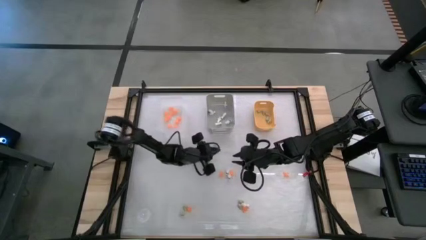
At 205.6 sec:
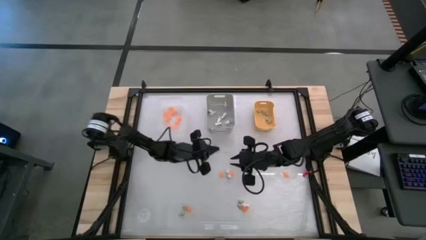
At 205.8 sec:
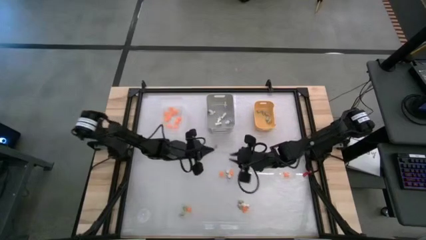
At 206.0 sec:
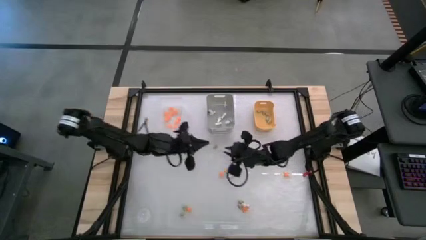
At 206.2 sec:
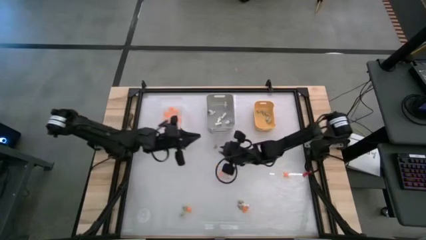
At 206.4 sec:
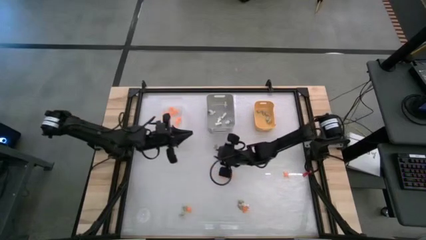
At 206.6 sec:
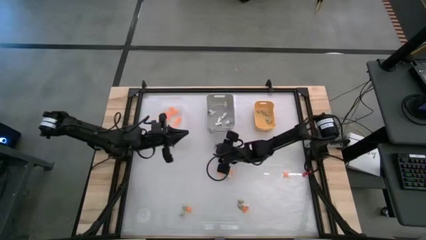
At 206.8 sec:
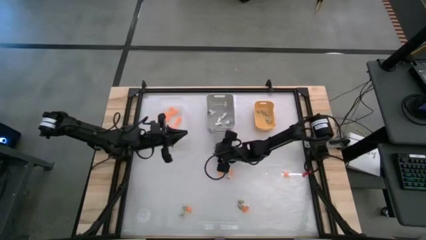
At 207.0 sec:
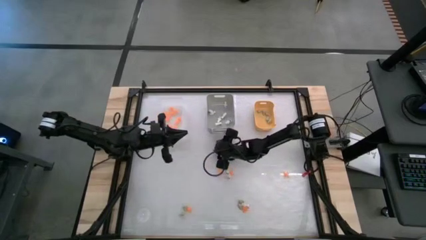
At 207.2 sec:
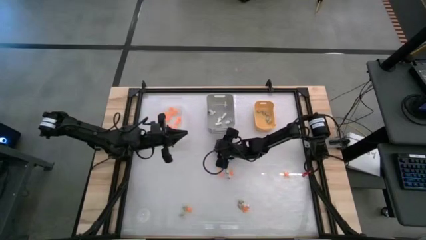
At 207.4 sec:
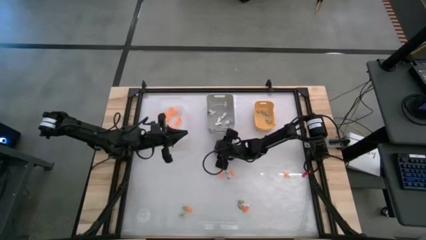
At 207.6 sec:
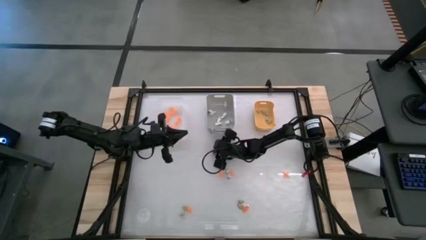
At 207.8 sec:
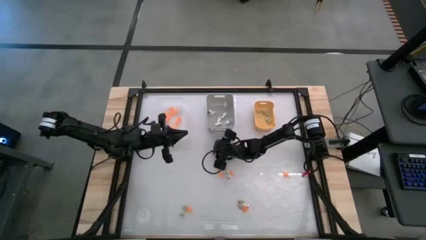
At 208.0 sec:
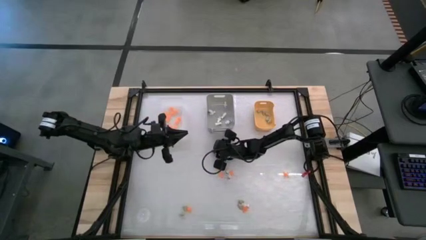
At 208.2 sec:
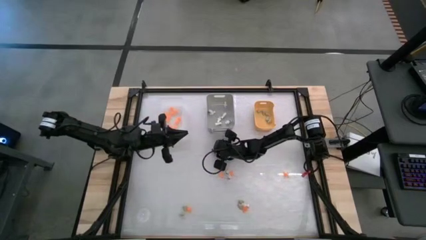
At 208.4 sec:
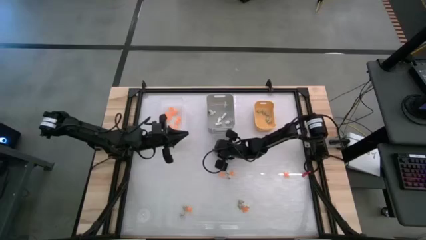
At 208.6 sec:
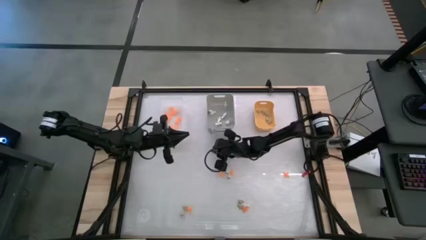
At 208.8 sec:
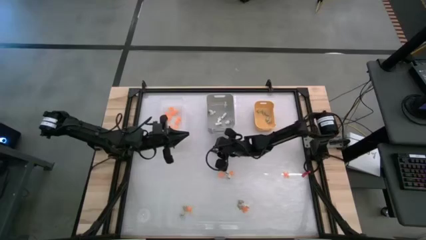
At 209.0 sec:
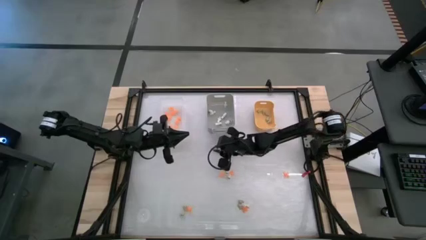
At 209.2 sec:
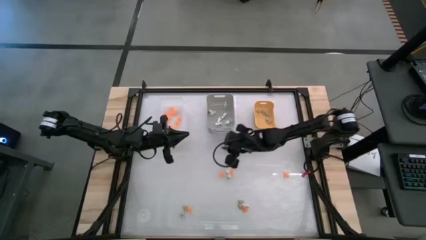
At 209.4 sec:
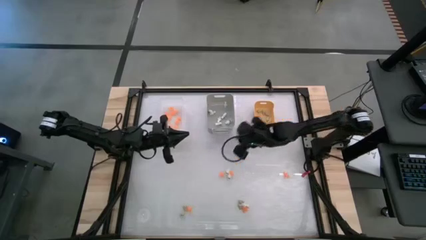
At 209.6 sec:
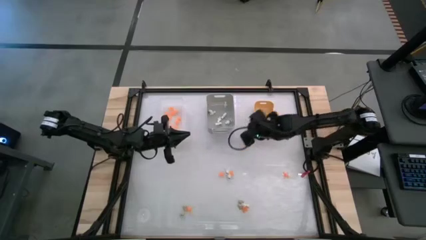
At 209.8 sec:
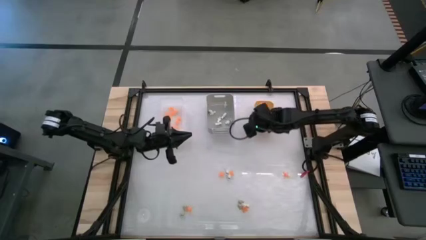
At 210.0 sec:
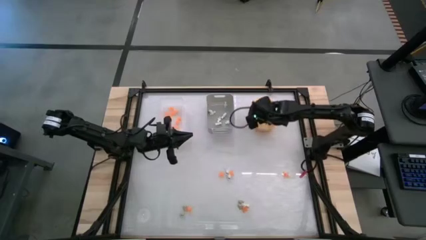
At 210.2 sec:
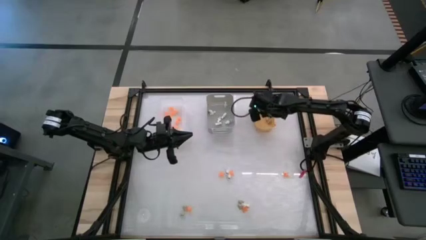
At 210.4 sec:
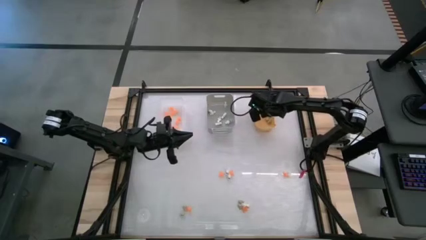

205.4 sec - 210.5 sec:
Task: Sort Halloween decoration
Put the cream white skull toy into the yellow bin

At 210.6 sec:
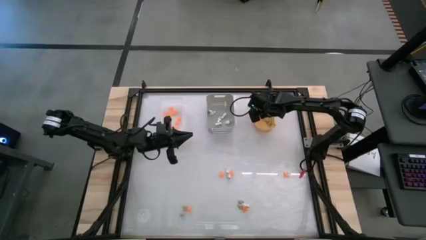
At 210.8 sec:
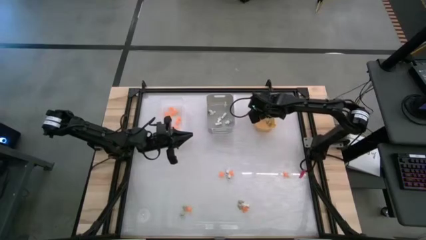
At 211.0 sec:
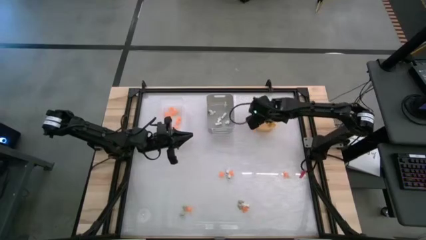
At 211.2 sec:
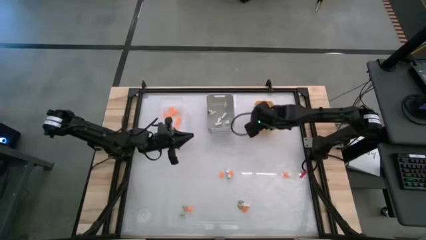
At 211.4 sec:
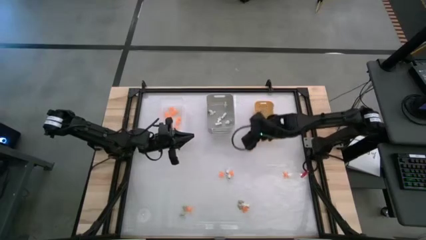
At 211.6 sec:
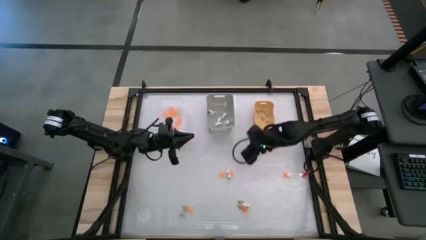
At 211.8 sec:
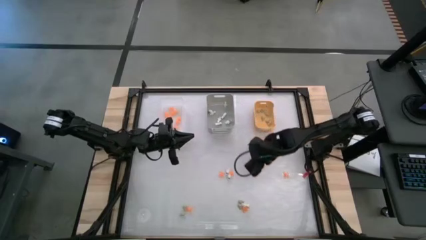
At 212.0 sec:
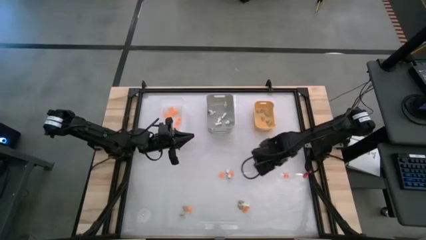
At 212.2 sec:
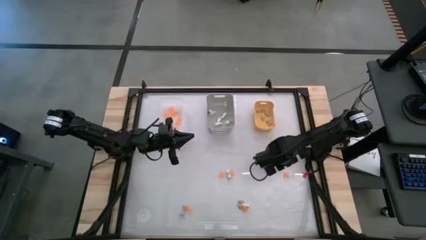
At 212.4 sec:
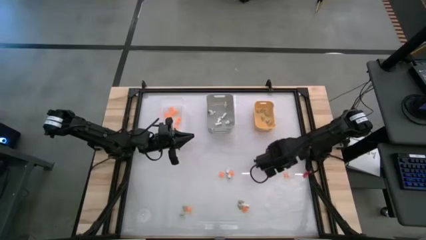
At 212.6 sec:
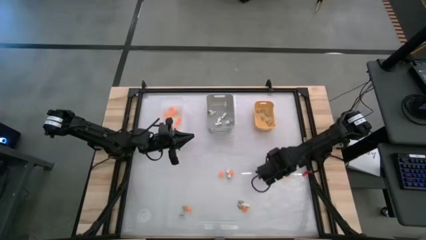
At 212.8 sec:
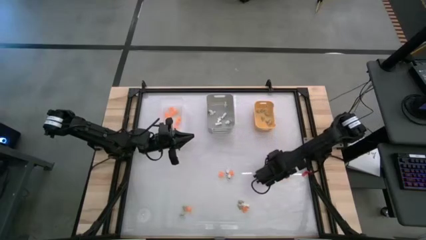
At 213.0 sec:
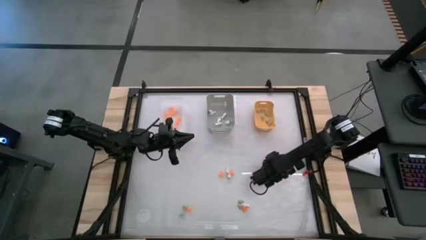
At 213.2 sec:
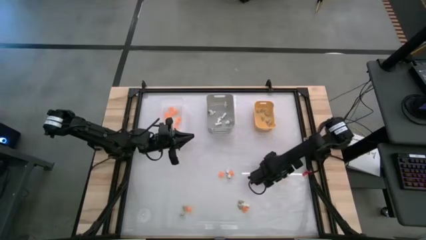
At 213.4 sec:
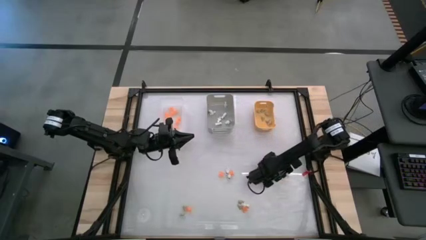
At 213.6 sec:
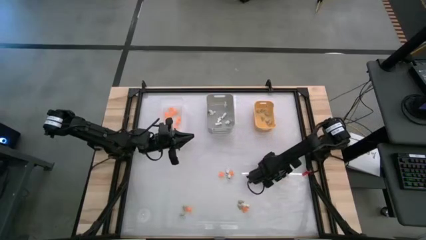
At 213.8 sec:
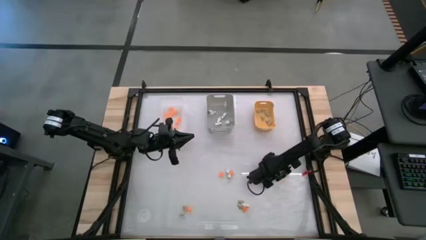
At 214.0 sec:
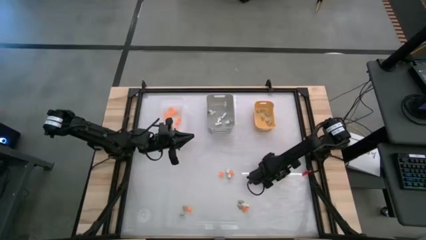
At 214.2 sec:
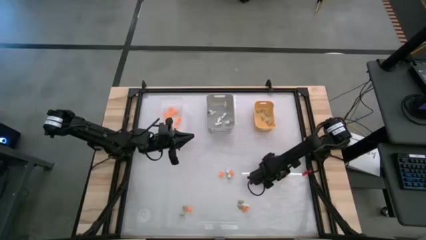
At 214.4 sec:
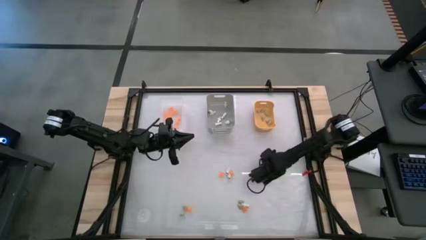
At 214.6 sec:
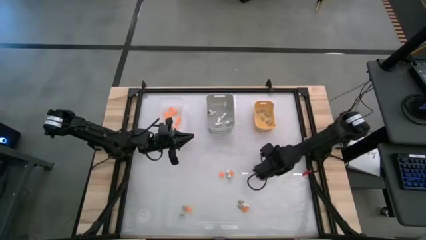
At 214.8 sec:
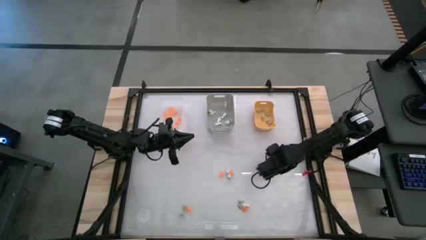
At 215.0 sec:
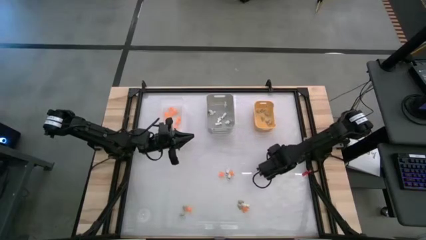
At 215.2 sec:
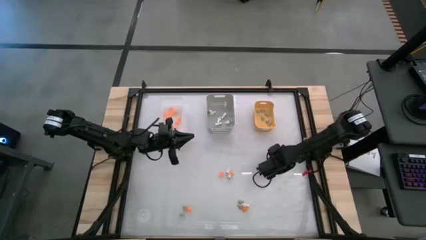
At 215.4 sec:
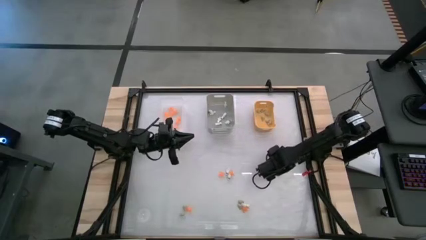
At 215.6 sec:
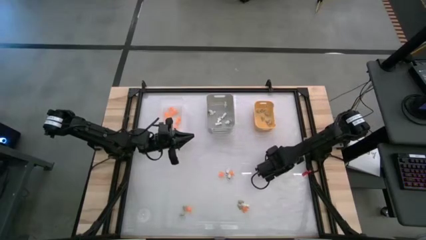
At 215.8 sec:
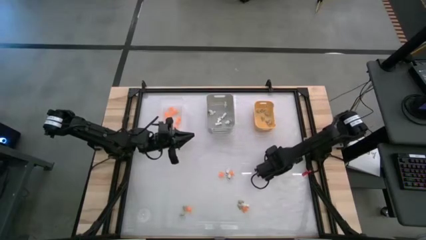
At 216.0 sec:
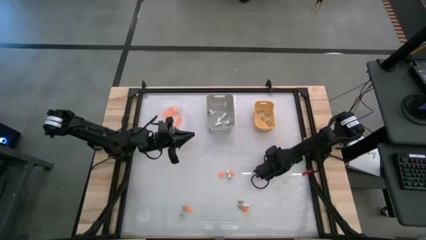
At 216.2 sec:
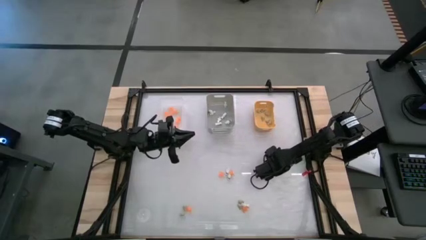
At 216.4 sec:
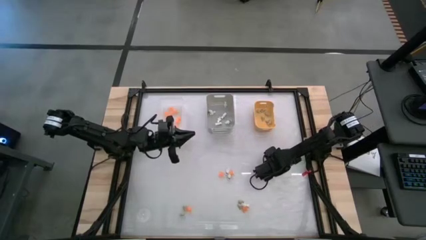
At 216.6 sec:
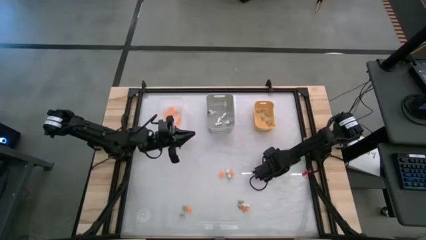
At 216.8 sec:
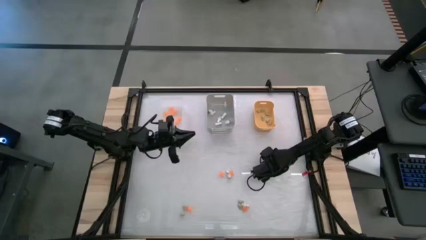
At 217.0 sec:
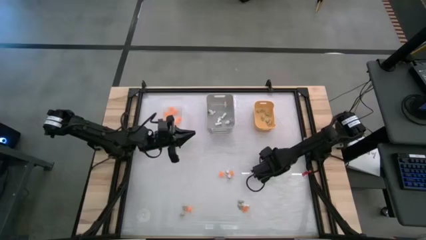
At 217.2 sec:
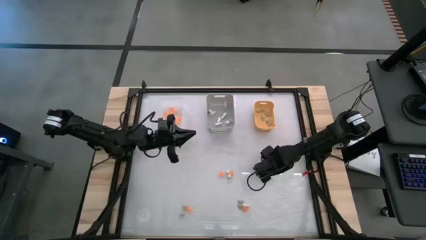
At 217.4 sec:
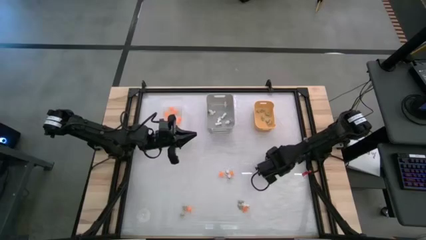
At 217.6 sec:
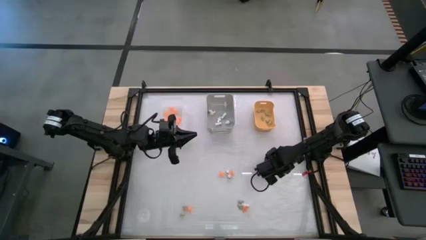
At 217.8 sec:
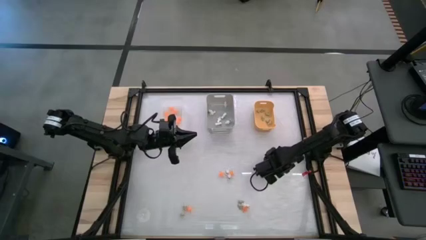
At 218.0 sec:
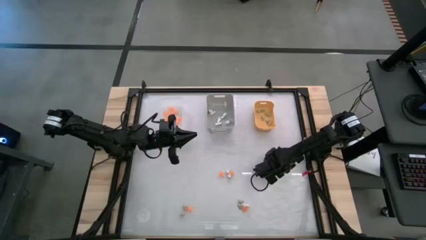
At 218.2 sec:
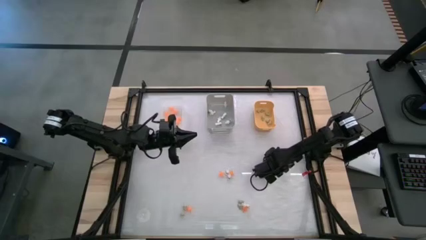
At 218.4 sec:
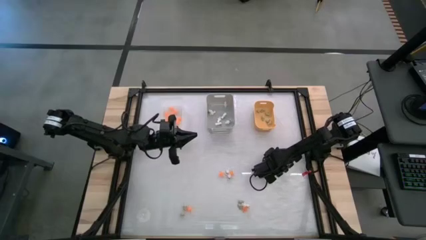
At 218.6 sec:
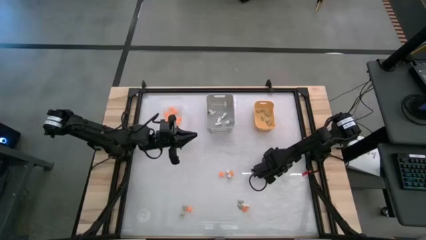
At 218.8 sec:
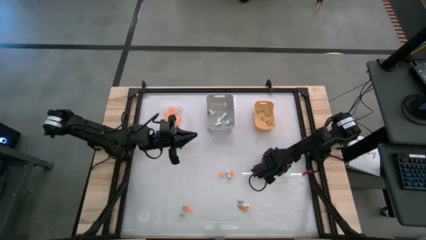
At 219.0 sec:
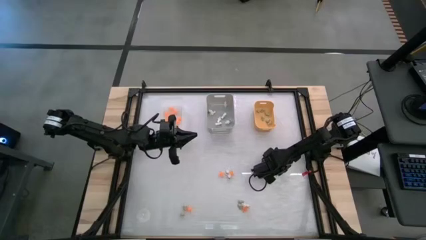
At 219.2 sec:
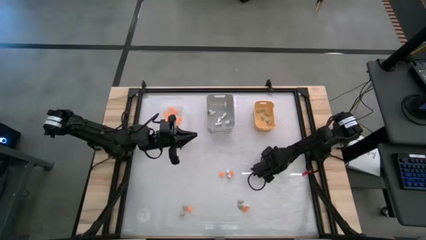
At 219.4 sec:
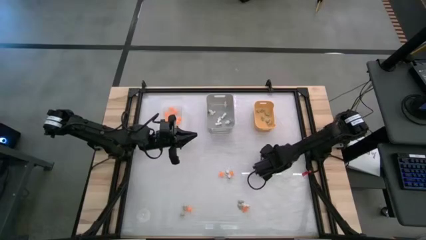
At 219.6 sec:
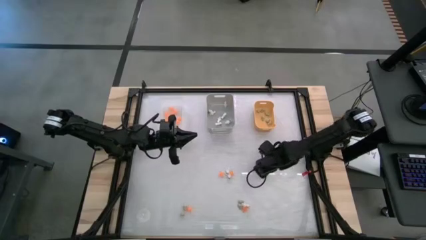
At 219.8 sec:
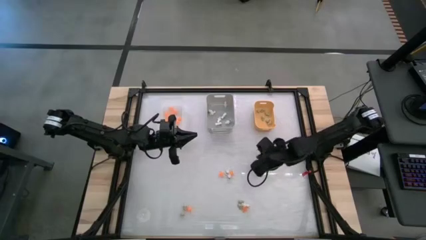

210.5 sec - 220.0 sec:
Put the orange spider toy into the transparent white bin

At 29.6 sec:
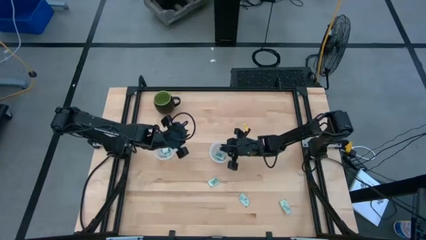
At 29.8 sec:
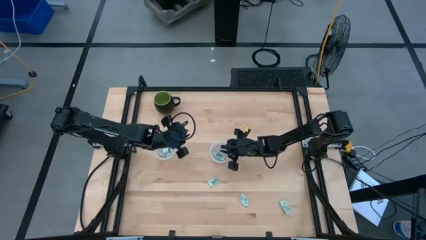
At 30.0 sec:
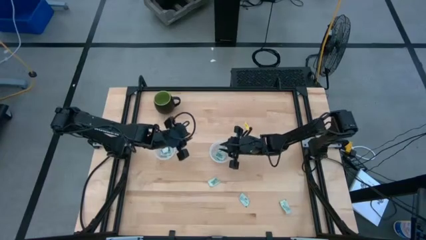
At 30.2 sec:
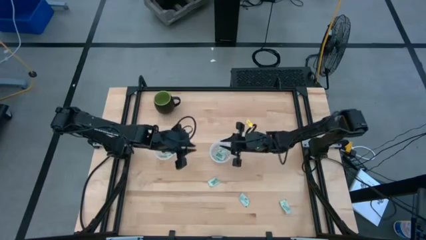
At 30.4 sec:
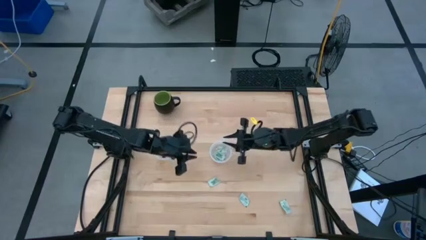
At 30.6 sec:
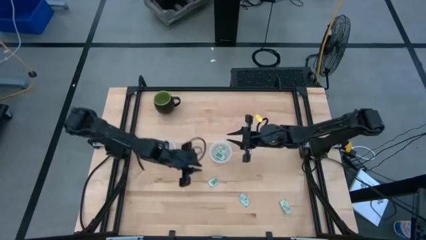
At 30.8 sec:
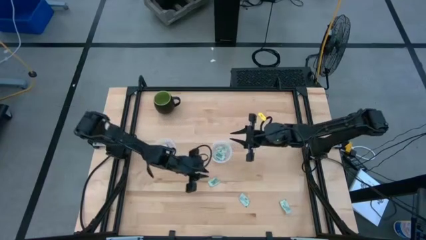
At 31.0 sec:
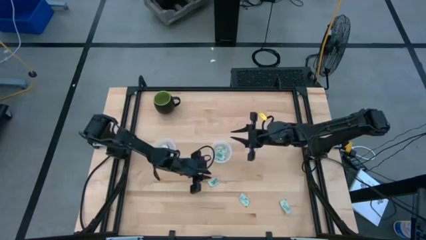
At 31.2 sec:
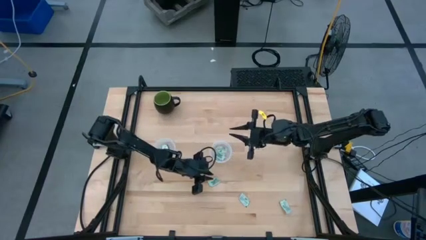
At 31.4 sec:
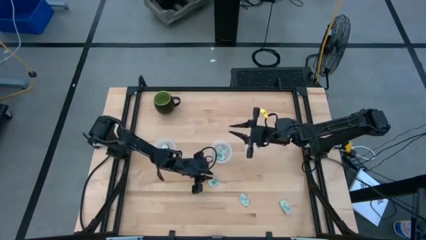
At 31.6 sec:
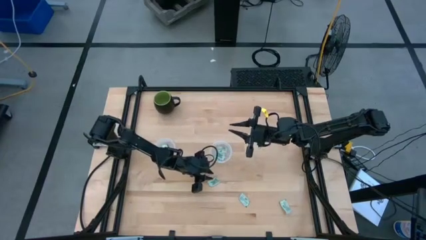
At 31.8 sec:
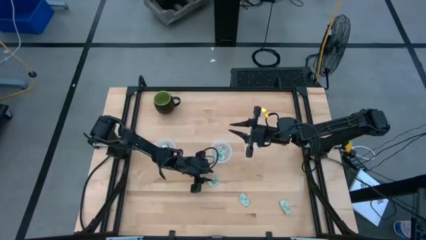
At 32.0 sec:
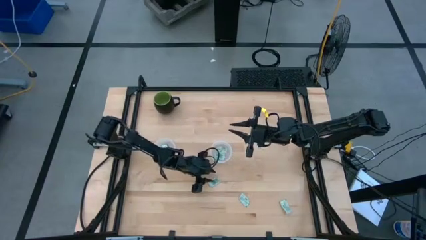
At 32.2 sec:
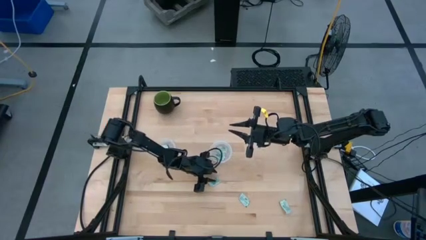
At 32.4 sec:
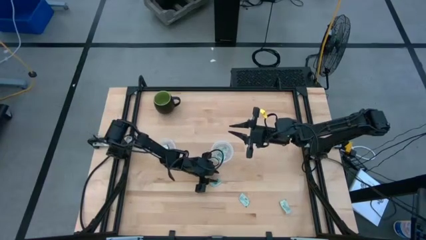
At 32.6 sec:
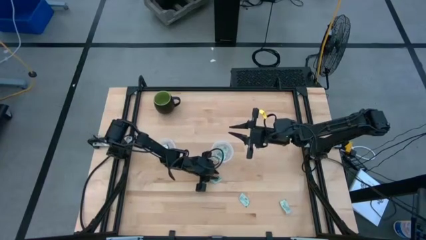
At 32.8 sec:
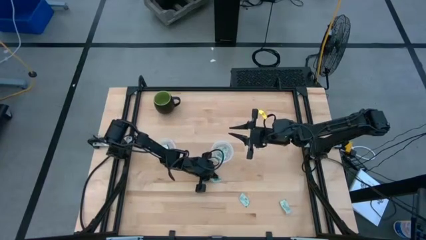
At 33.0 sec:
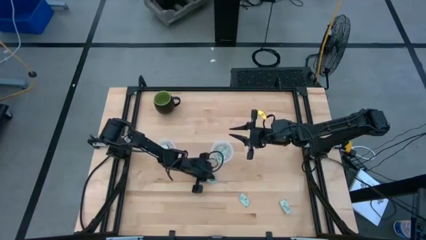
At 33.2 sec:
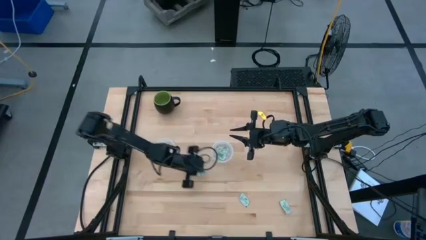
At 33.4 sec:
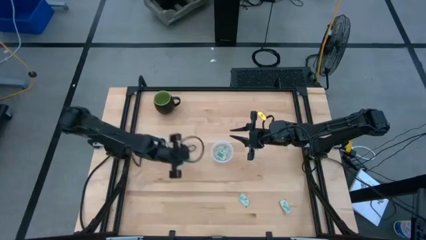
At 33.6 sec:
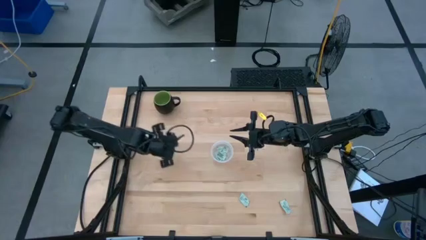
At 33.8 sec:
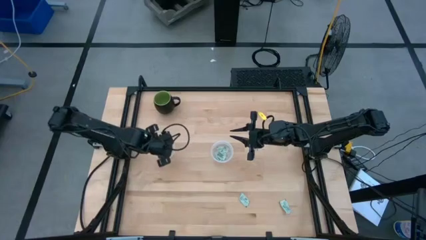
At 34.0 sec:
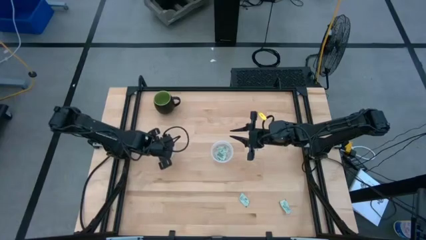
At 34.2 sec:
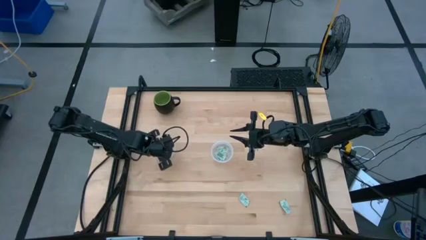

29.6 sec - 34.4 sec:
Task: Pick and place Stevia / Truvia into bins
Put the white stevia packet into the left transparent container
